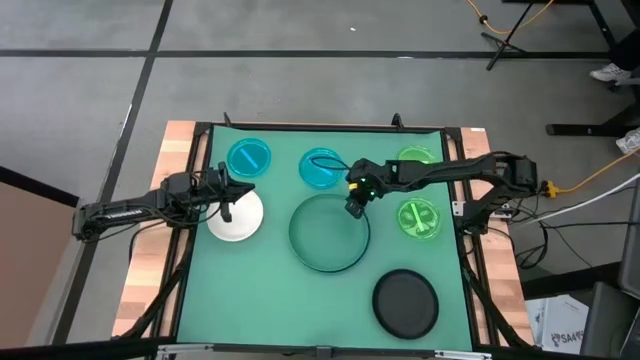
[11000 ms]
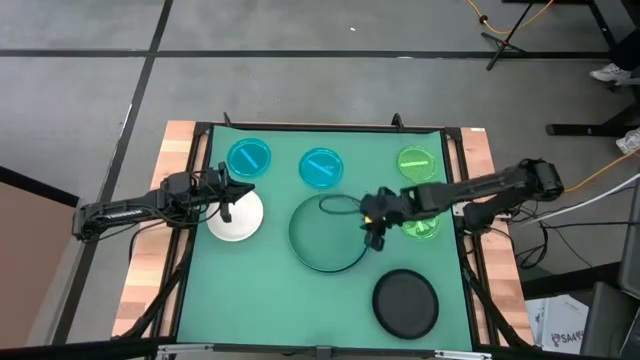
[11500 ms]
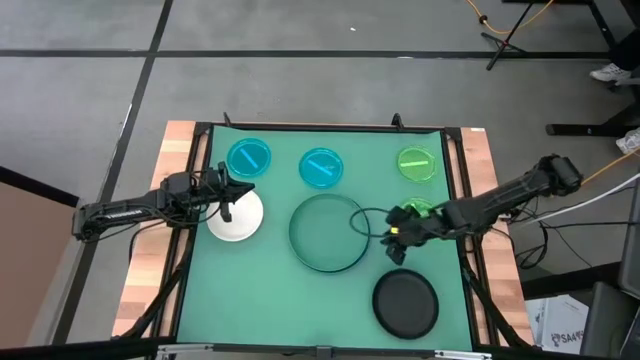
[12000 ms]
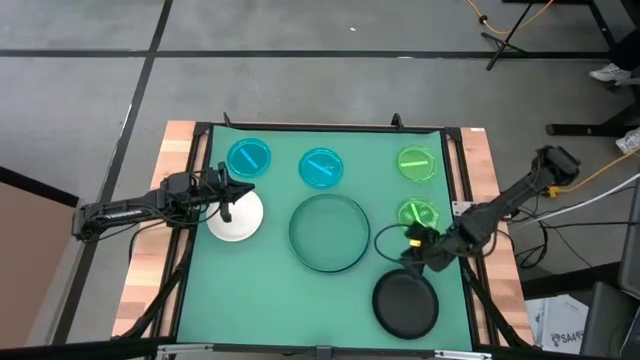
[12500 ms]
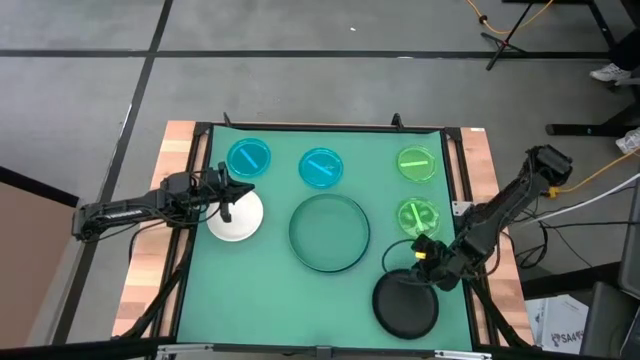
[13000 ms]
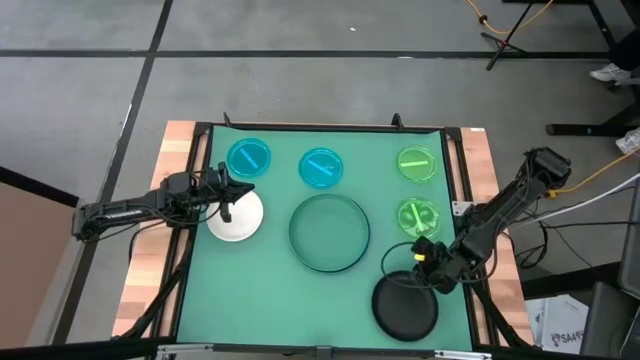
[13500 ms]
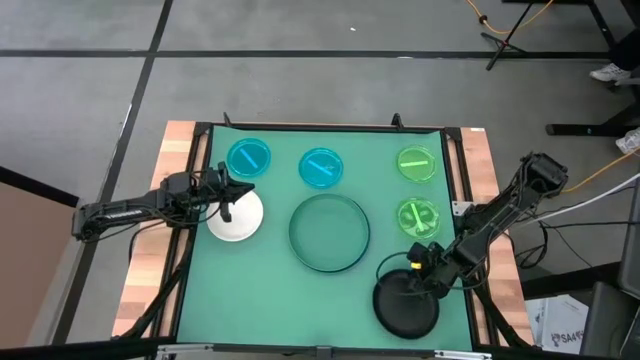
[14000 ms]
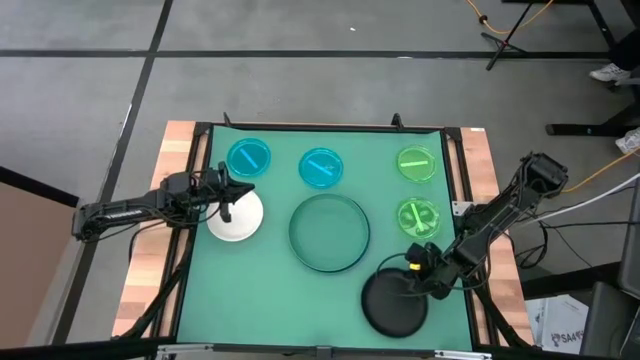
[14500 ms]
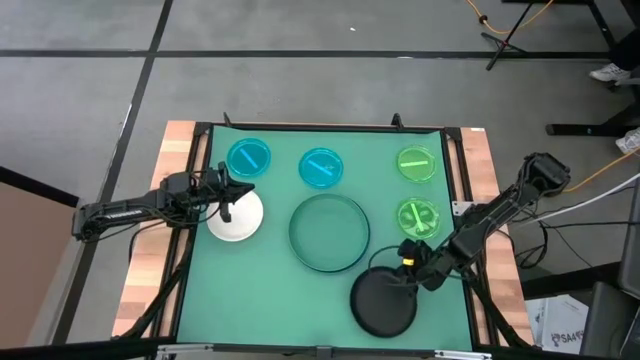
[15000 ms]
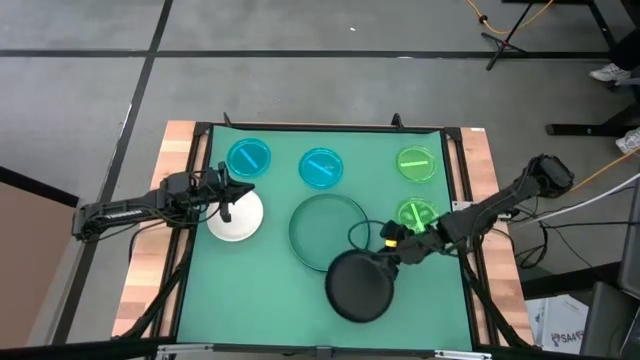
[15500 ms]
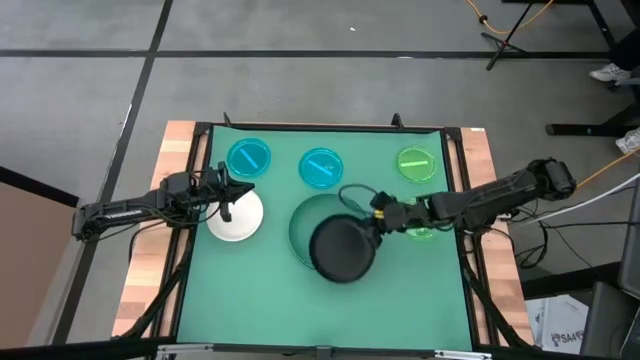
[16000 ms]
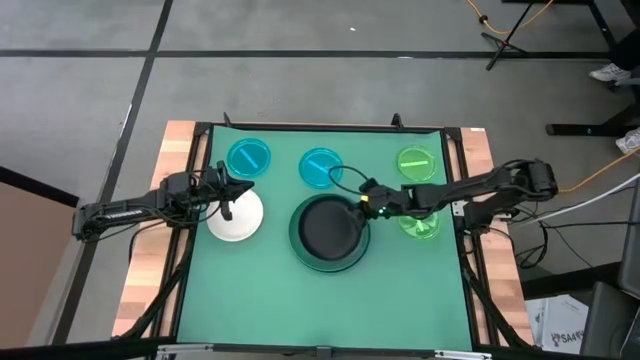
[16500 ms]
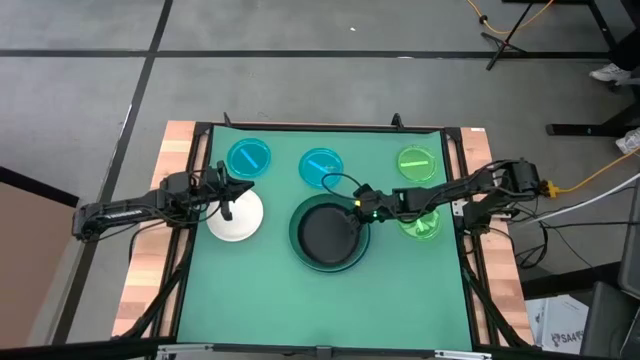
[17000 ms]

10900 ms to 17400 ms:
Task: Stack plastic plates
Stack the black plate on top of the green plate

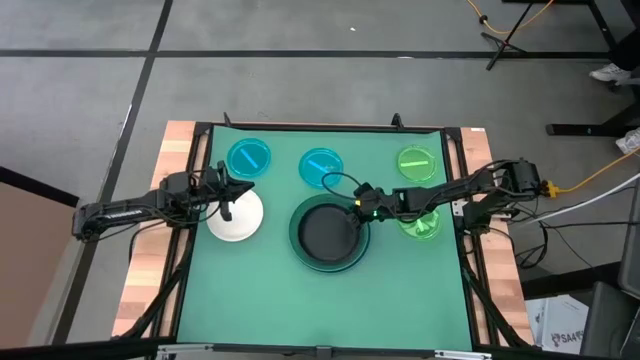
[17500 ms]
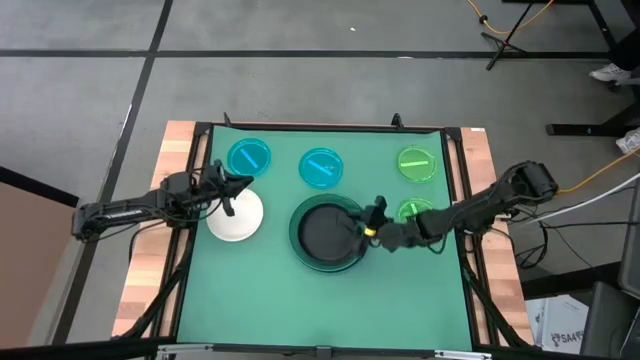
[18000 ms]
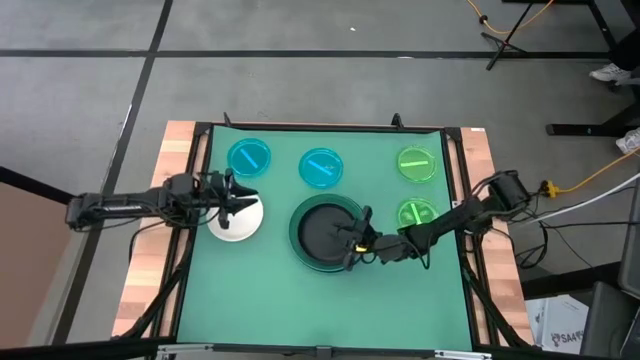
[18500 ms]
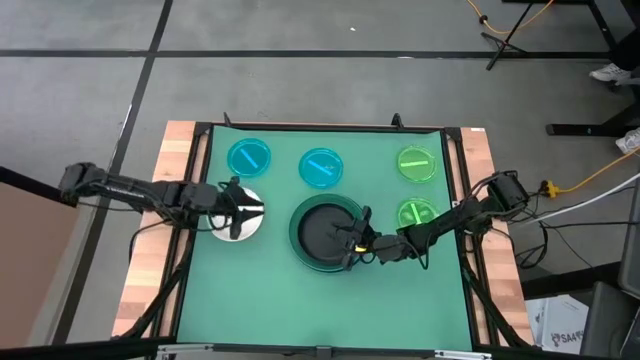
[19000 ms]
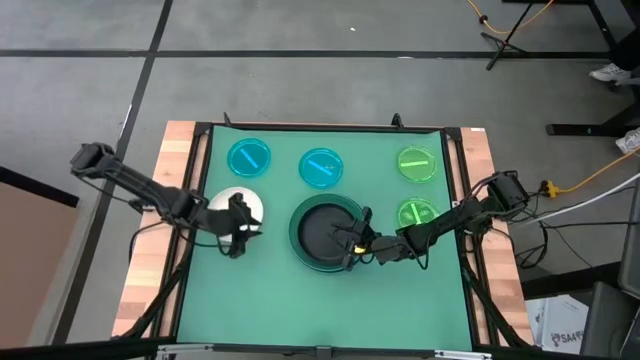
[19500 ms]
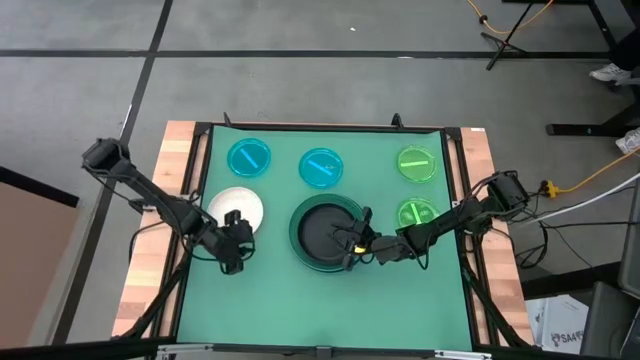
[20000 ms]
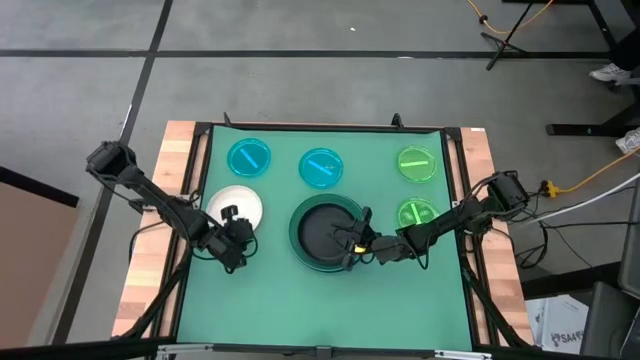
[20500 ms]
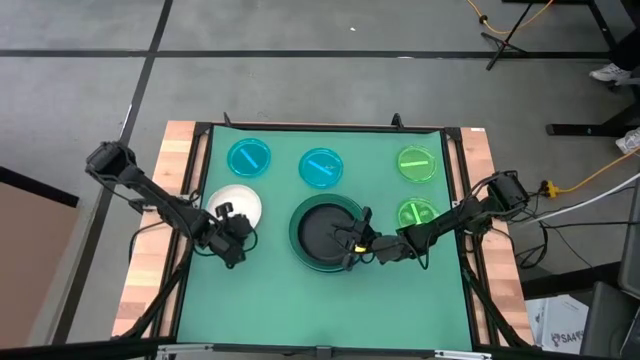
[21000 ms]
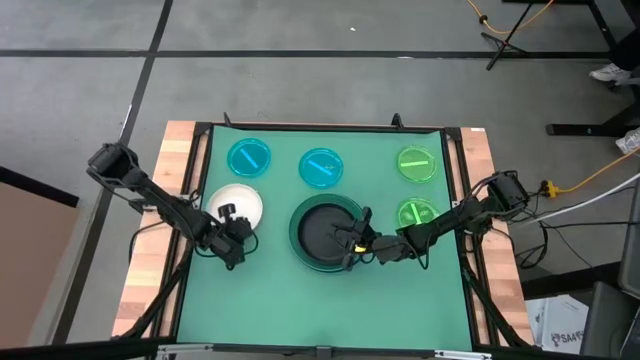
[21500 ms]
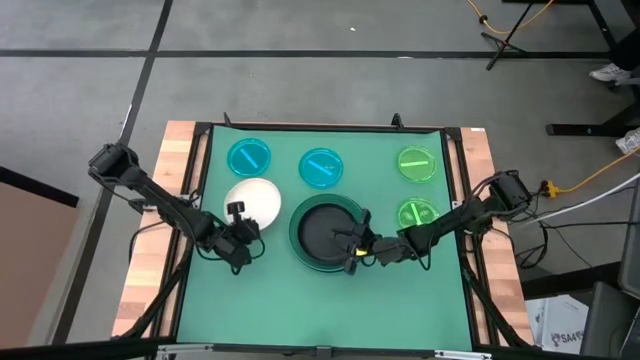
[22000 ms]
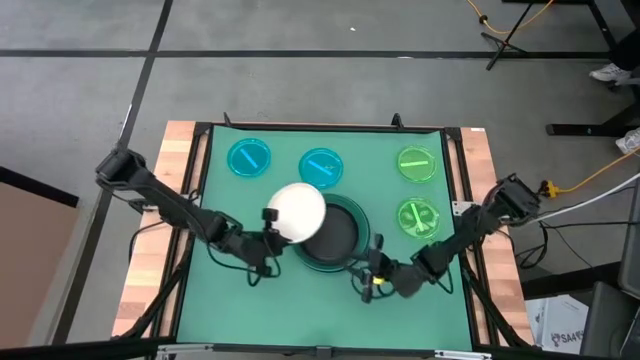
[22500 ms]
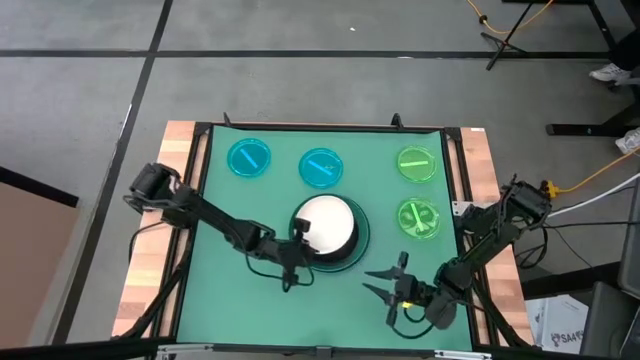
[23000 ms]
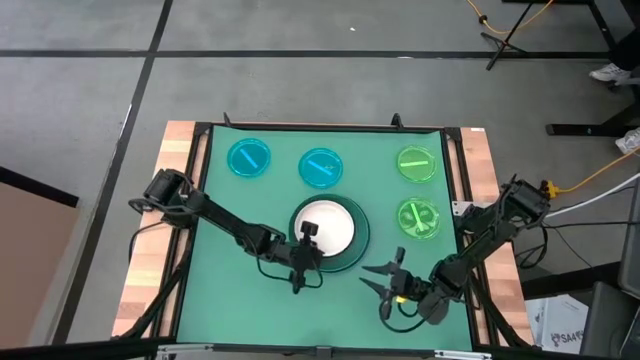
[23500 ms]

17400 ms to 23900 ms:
Stack the white plate on top of the black plate

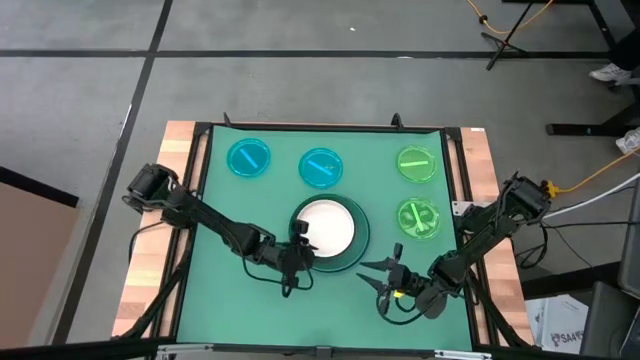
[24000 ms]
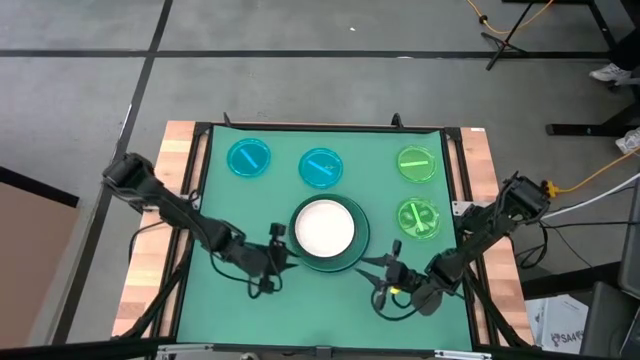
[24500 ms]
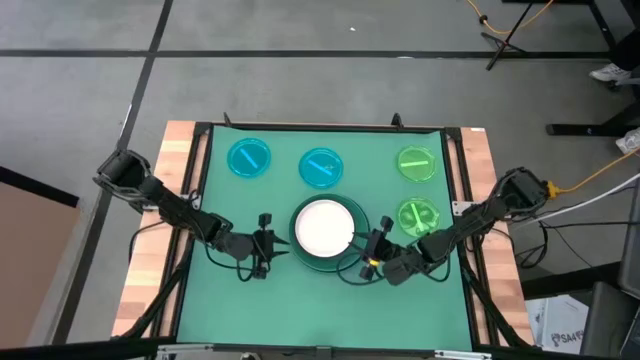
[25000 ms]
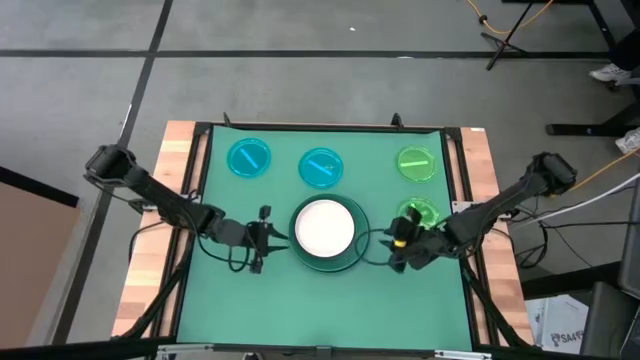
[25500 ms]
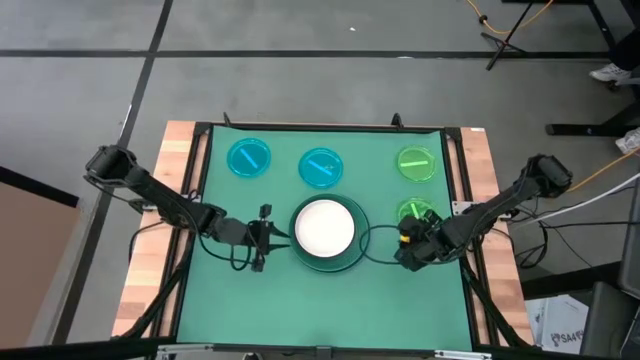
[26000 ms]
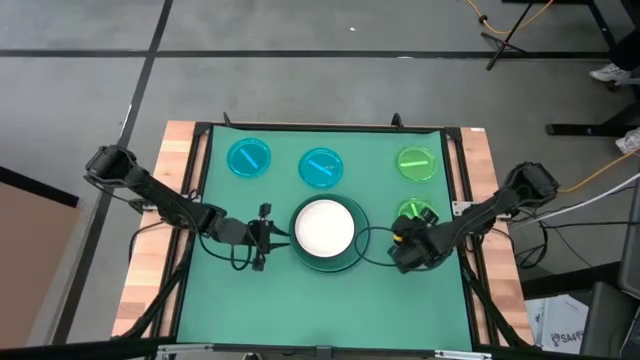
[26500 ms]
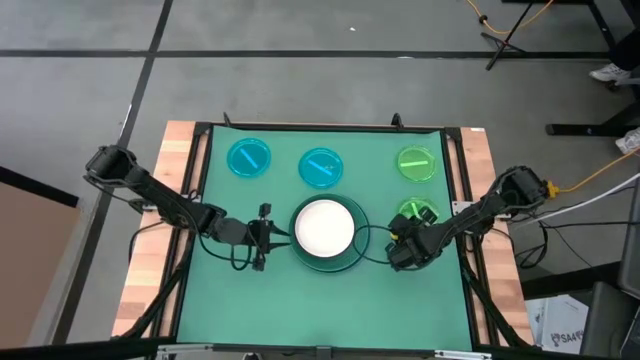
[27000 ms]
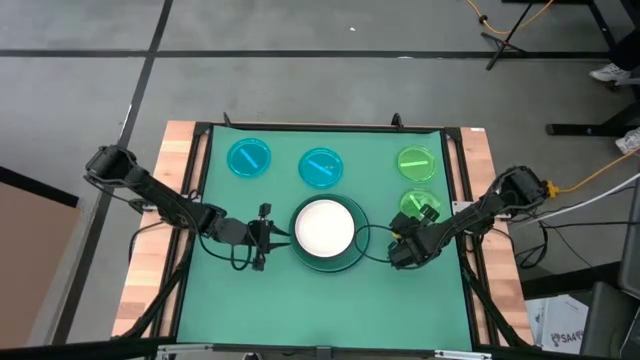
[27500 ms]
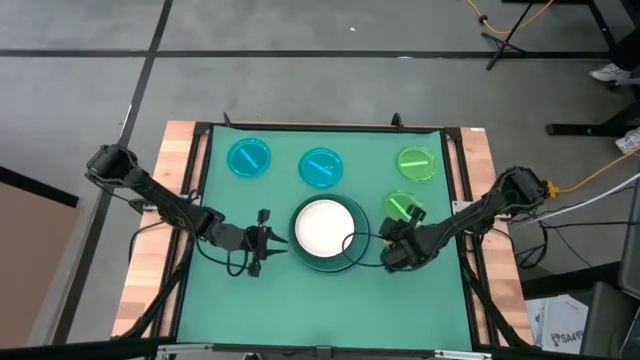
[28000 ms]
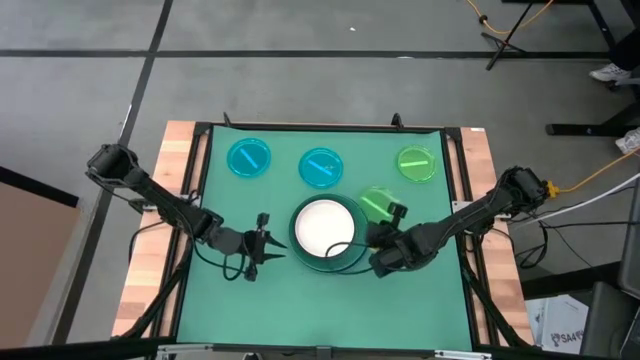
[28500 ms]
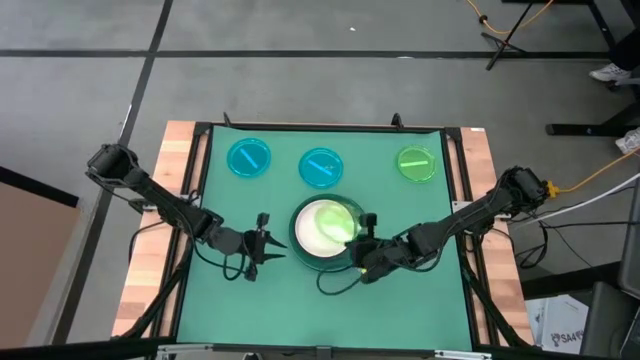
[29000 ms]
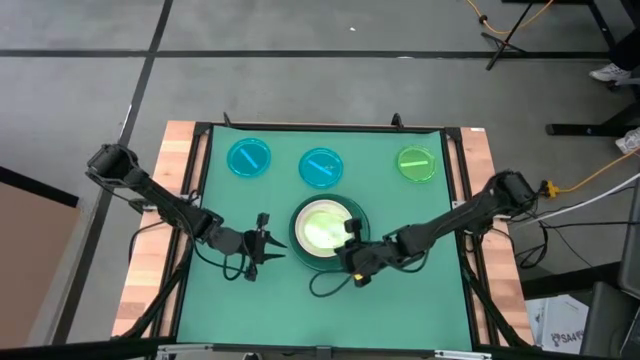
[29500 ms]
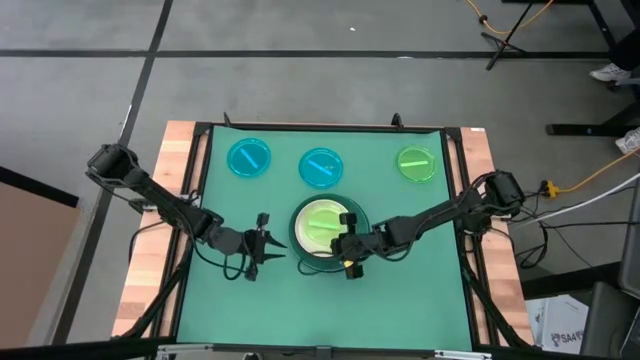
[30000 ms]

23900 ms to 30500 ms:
Stack the bottom light green plate on top of the white plate

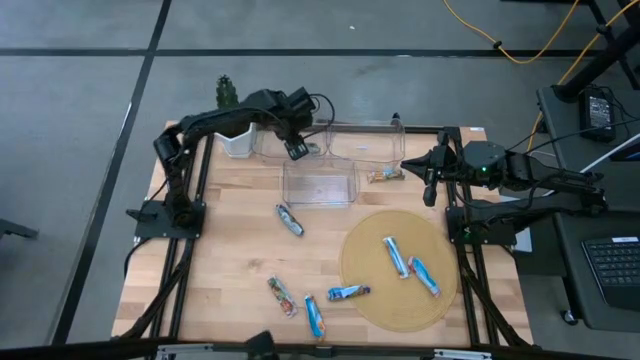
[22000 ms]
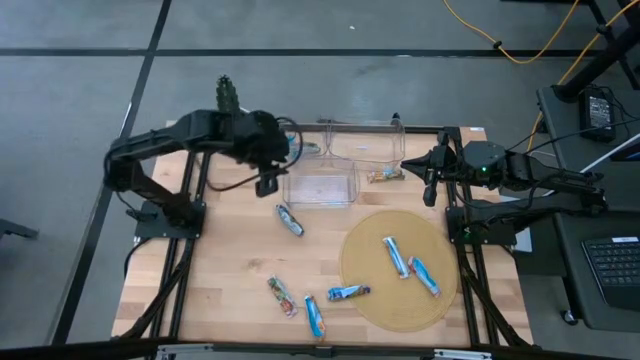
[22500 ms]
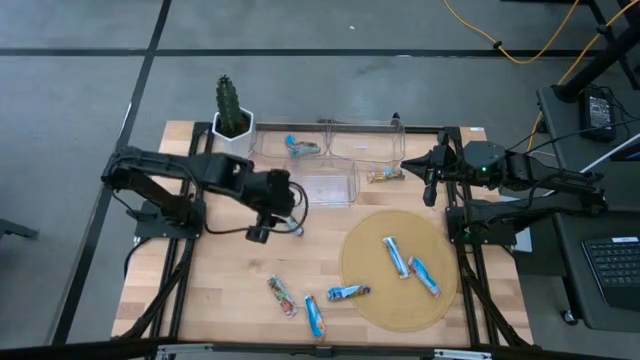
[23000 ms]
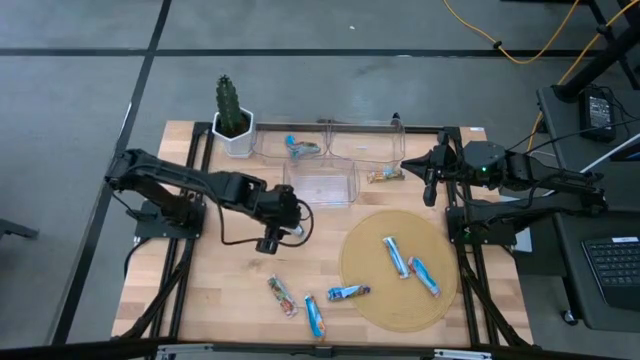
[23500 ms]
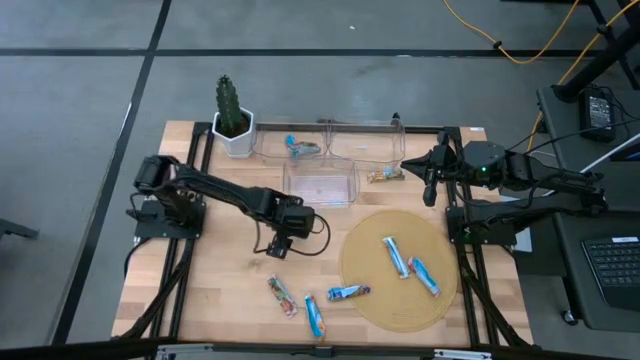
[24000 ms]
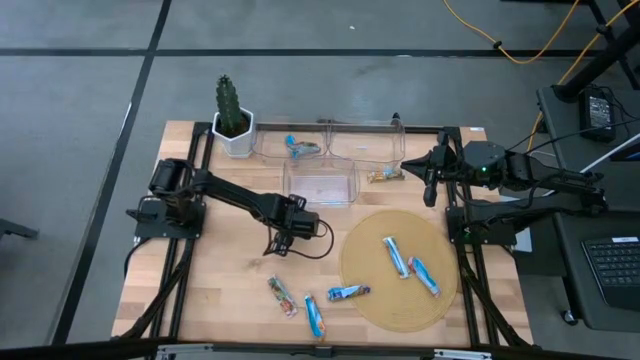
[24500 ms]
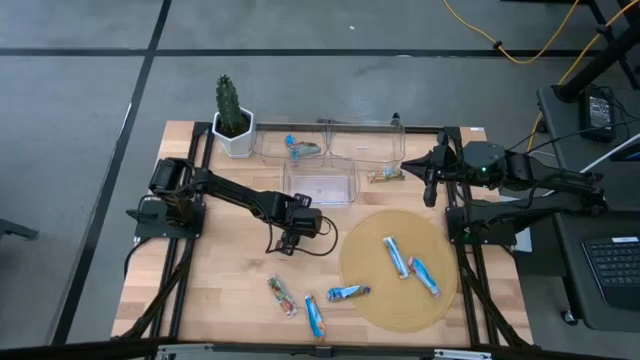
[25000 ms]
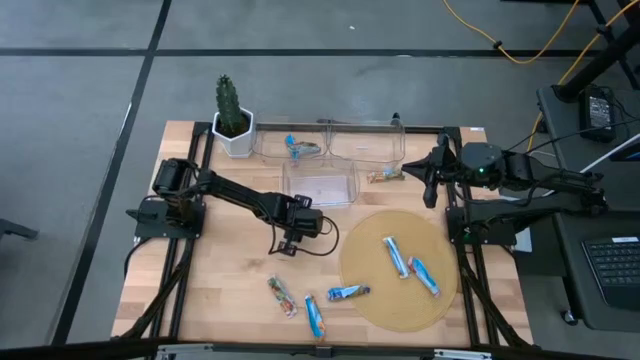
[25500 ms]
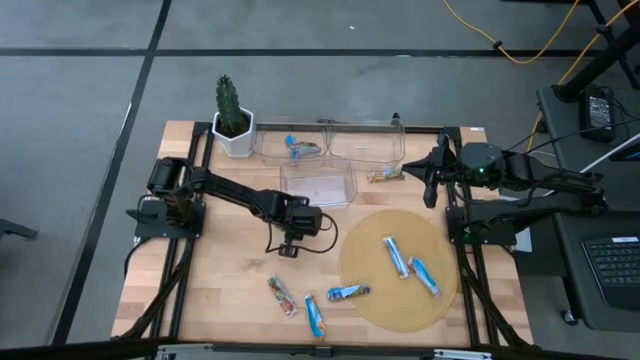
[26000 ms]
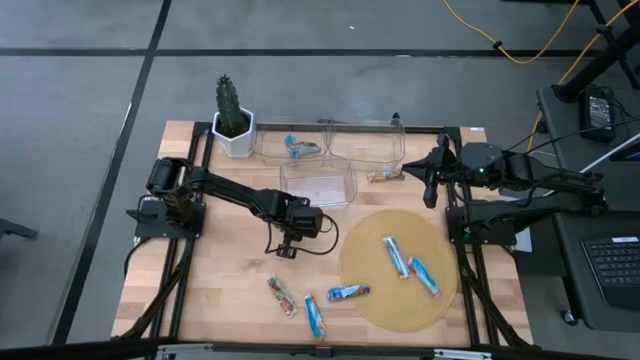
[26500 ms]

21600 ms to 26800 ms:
Task: Pick and place Granola Bars by type
Put the blue granola bar into the top right transparent bin
